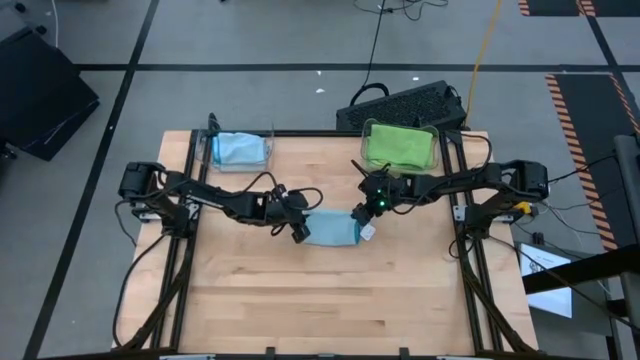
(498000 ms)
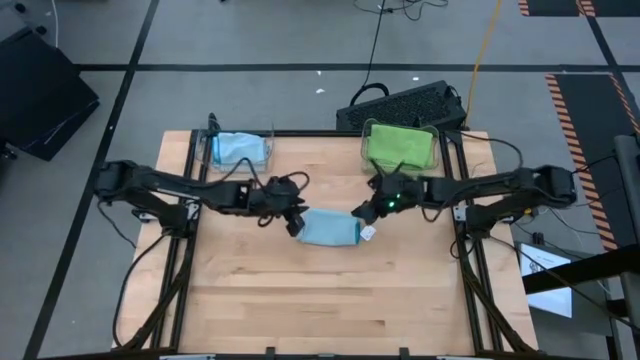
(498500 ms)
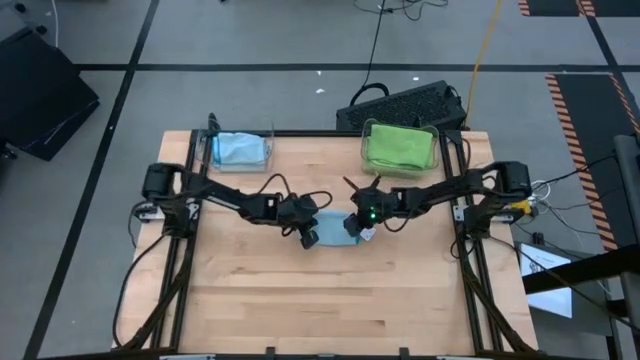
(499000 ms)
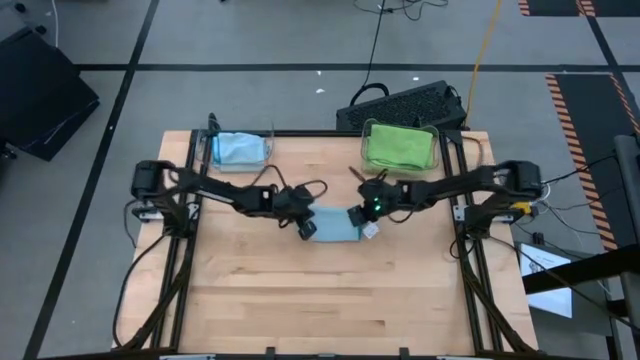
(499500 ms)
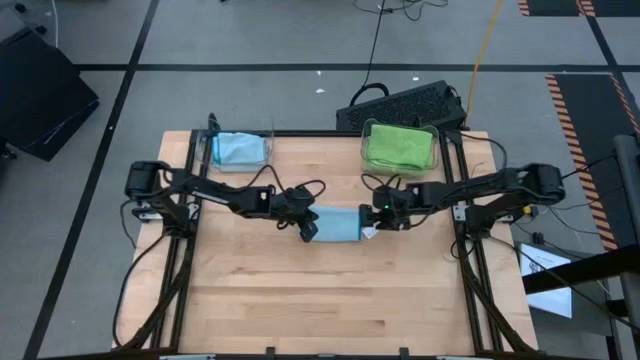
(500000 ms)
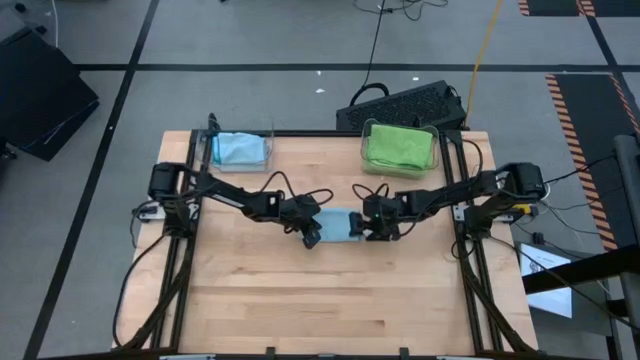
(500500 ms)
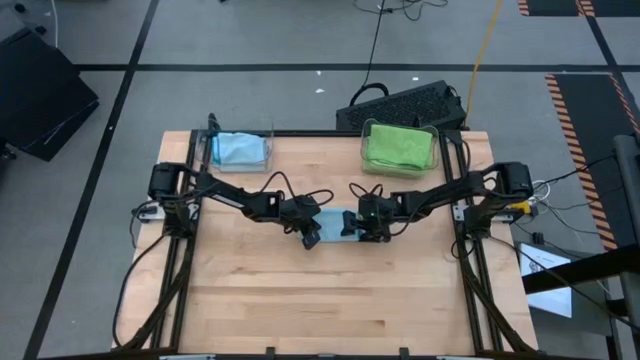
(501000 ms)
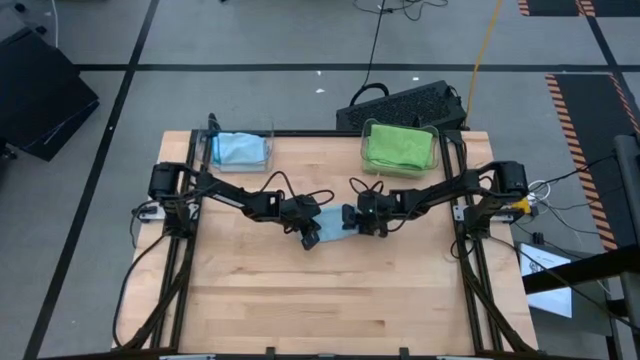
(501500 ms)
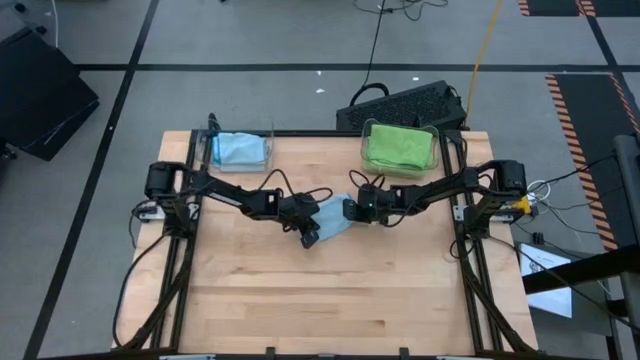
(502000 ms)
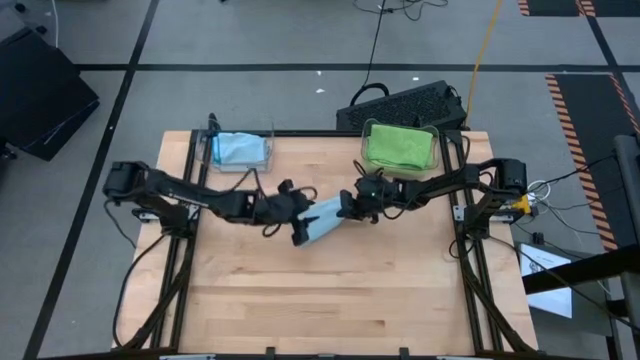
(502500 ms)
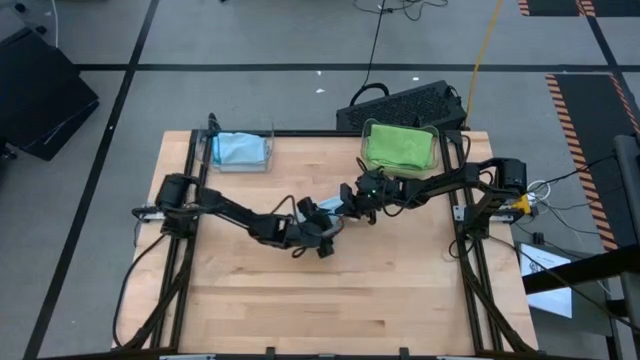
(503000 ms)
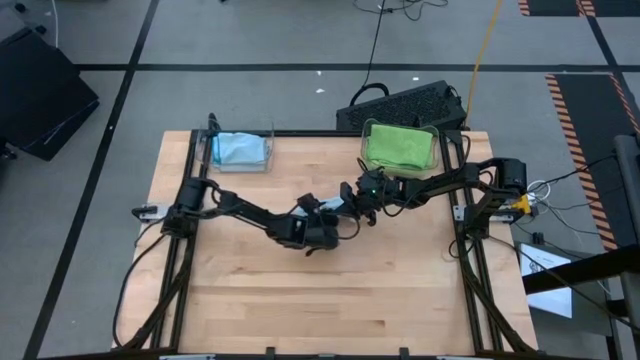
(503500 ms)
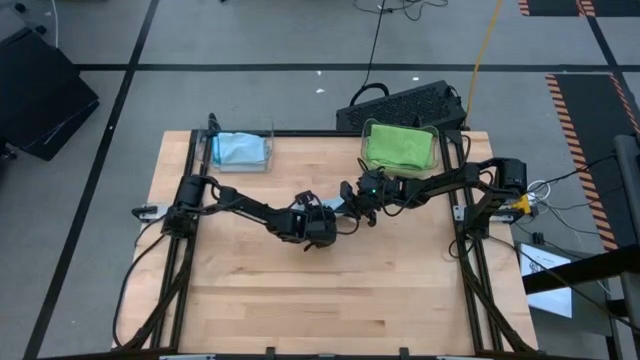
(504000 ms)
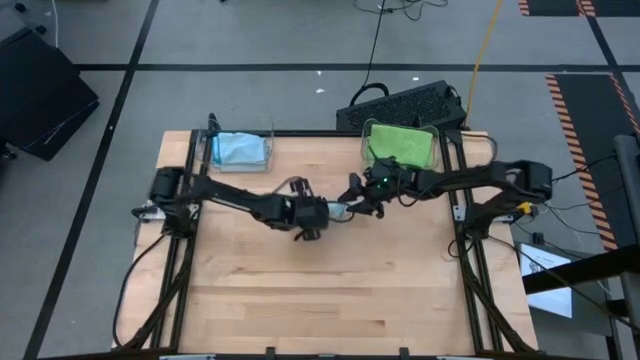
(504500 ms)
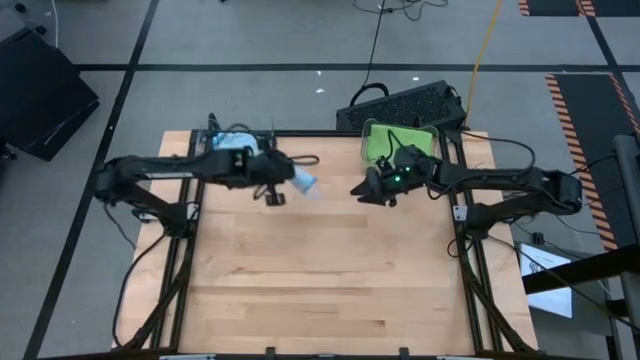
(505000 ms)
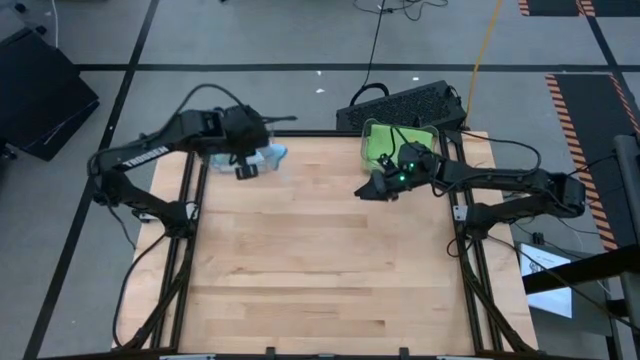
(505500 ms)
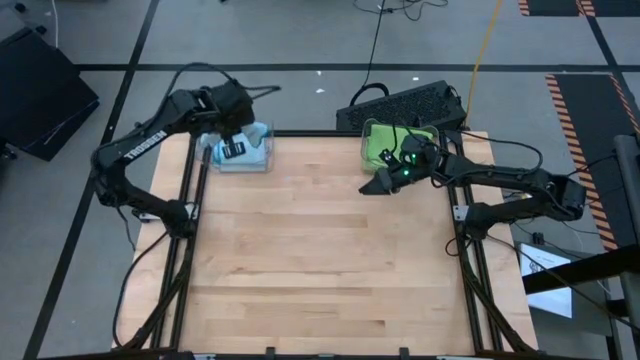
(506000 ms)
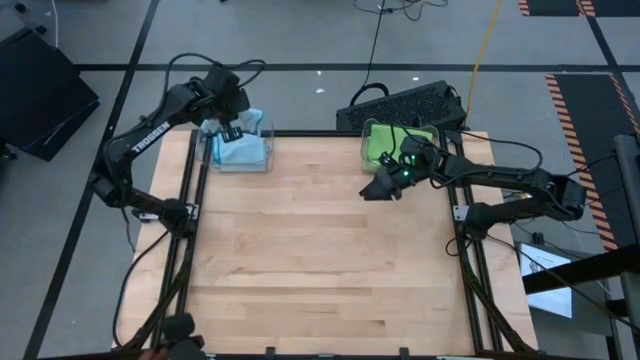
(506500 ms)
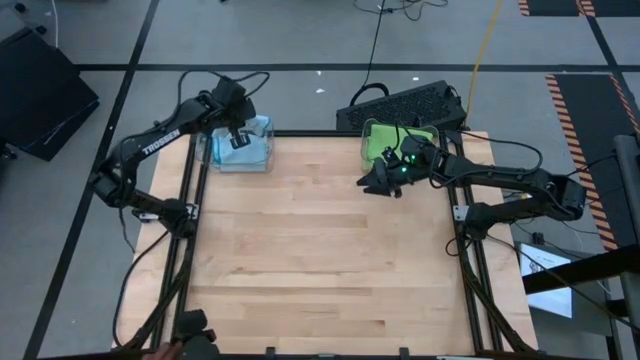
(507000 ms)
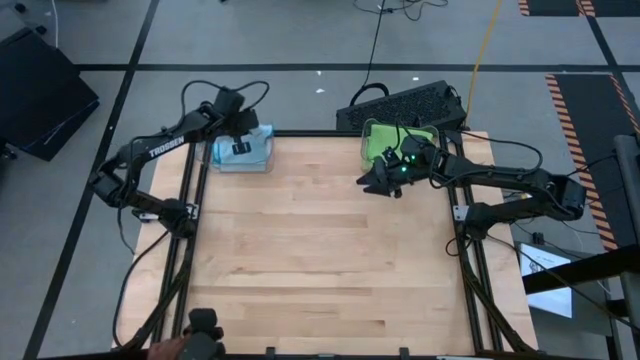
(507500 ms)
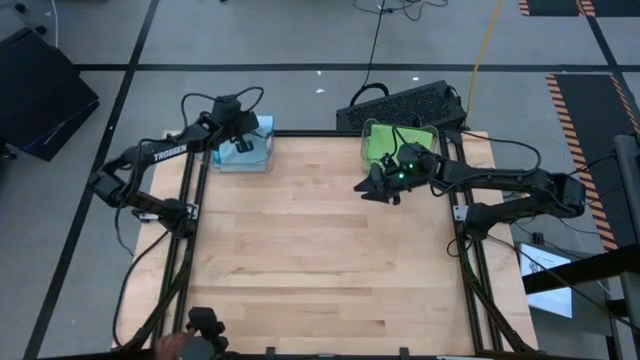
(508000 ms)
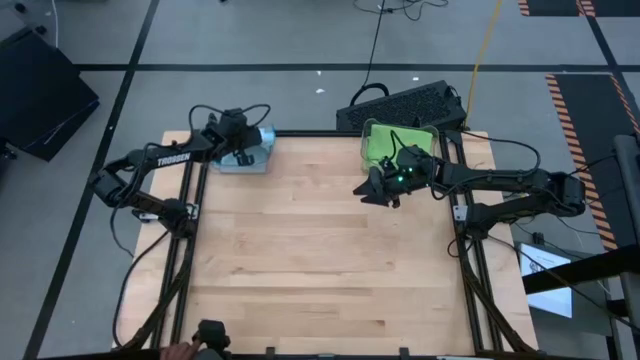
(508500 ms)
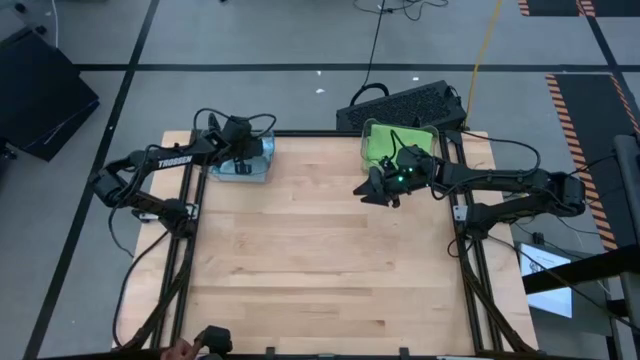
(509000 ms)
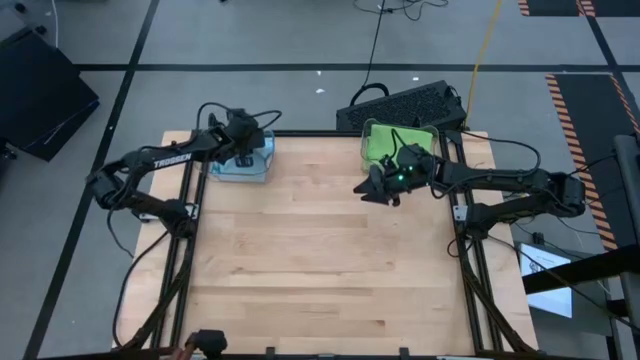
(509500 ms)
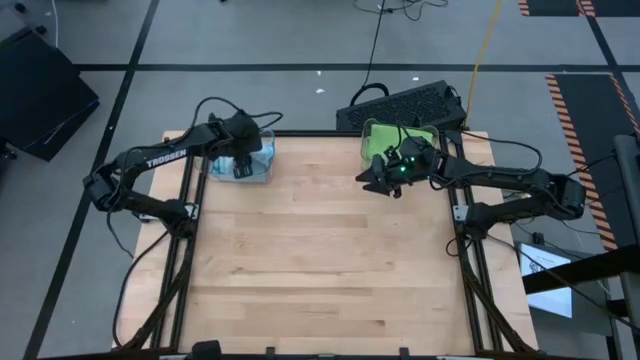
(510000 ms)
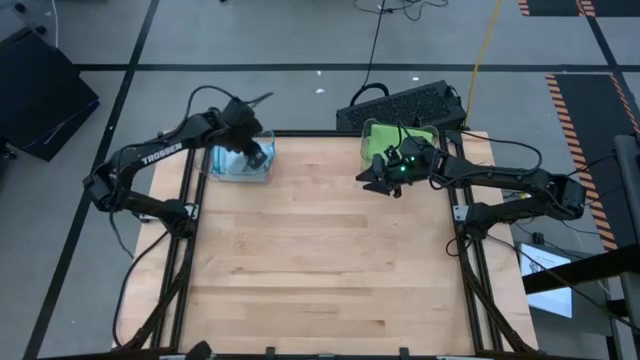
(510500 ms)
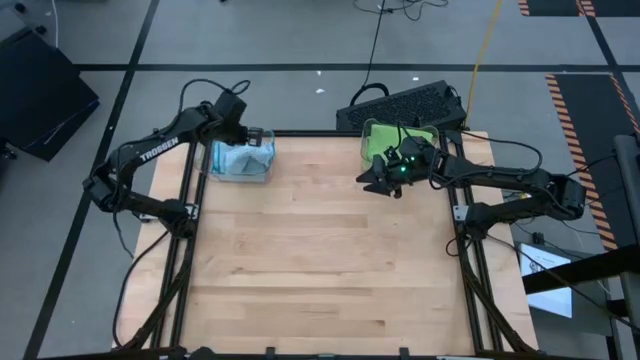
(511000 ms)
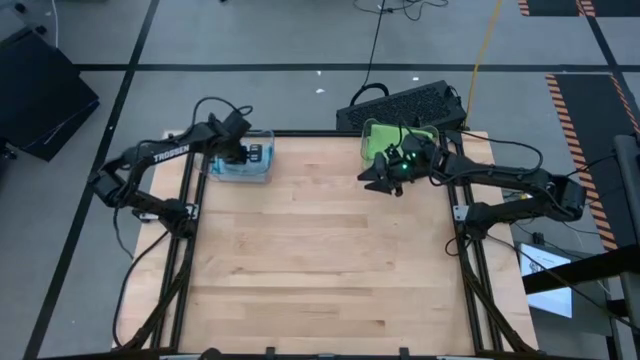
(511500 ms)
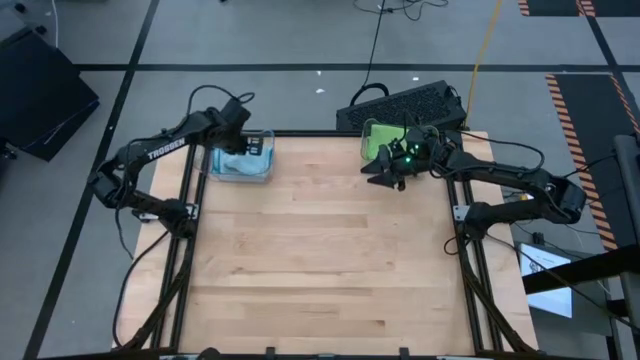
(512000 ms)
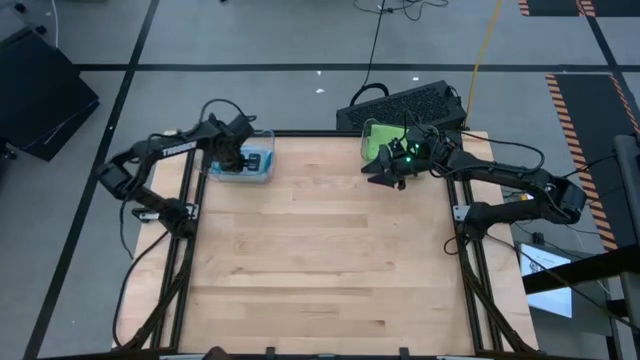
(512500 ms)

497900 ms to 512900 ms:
Task: Sort microfiber towel by color & place in baskets
Stack the blue towel on top of the blue towel in the left transparent bin

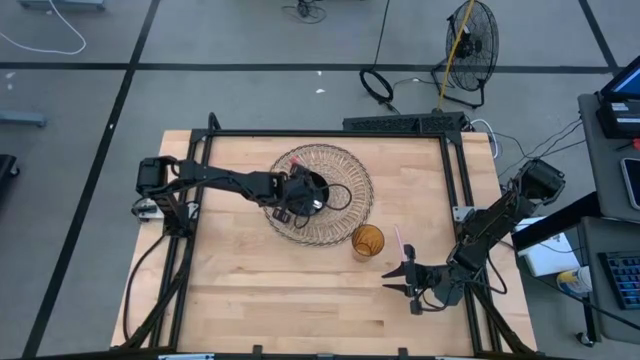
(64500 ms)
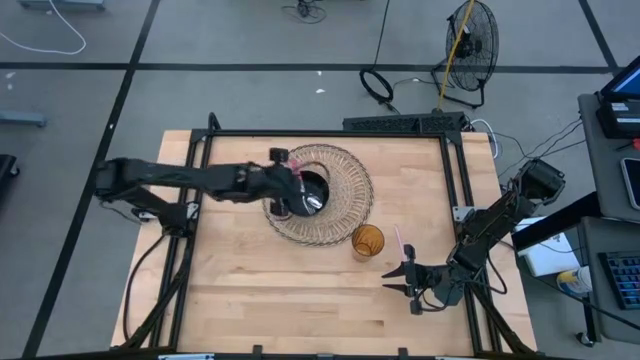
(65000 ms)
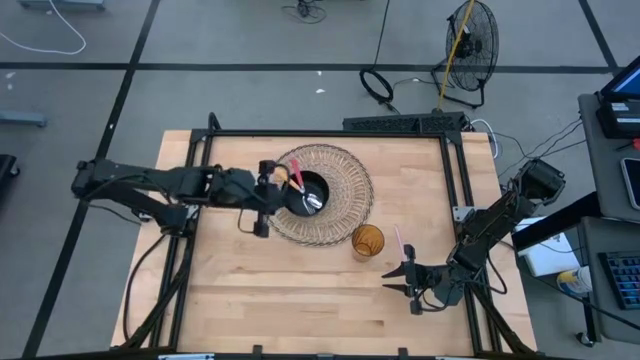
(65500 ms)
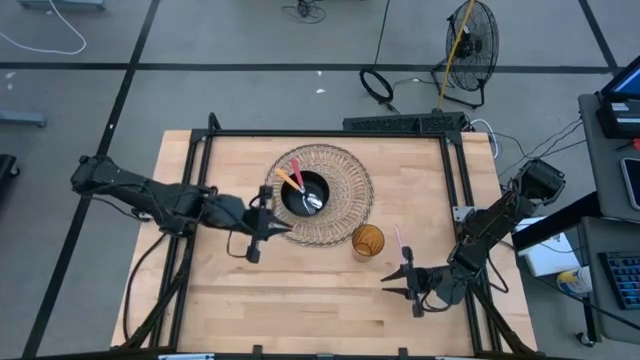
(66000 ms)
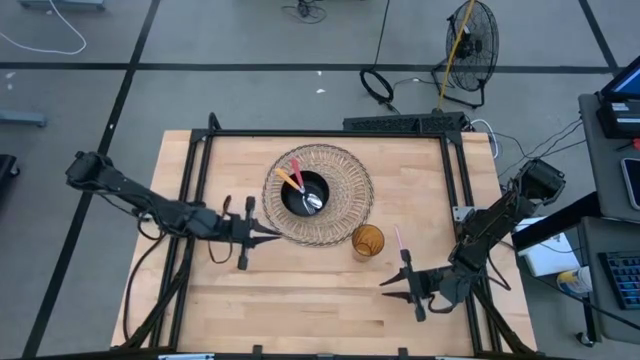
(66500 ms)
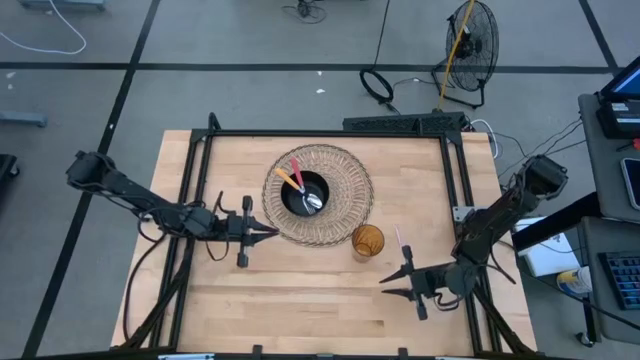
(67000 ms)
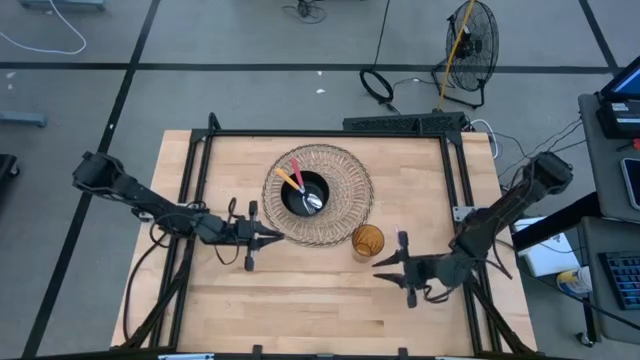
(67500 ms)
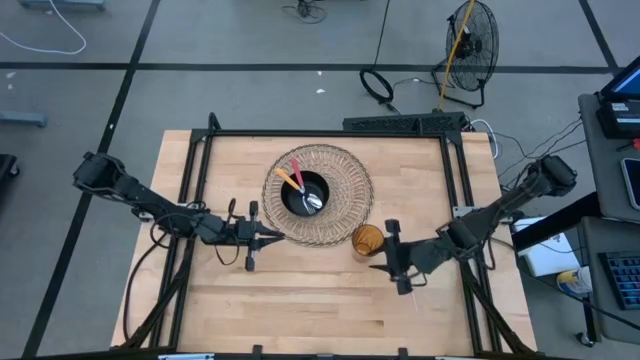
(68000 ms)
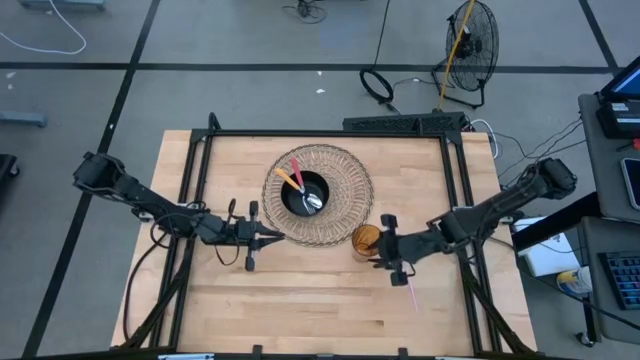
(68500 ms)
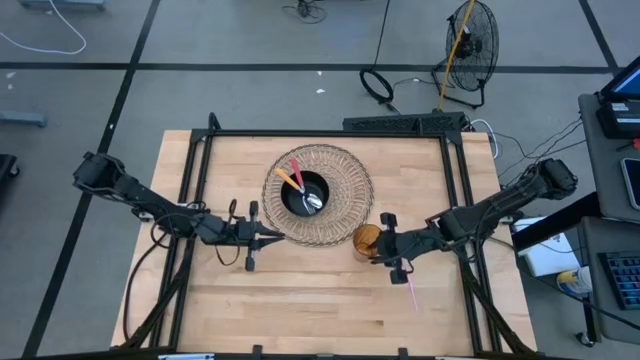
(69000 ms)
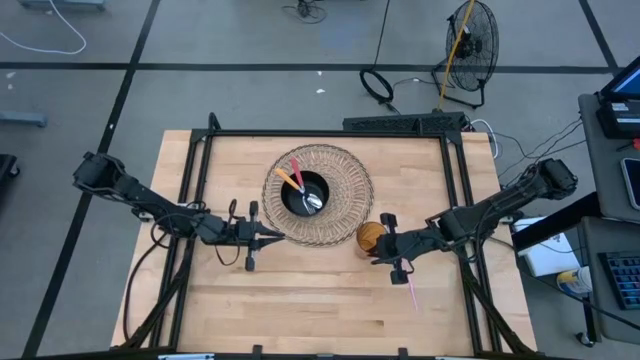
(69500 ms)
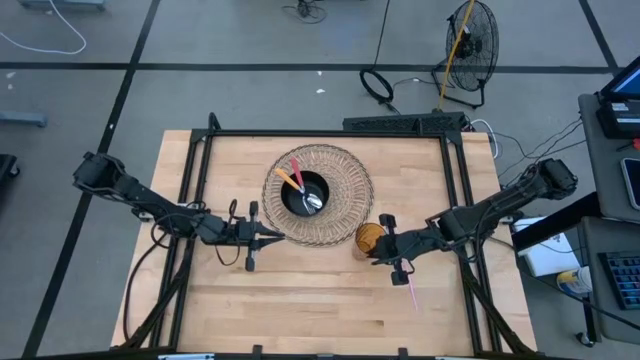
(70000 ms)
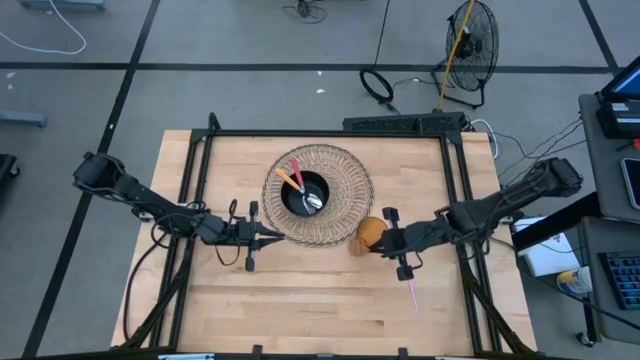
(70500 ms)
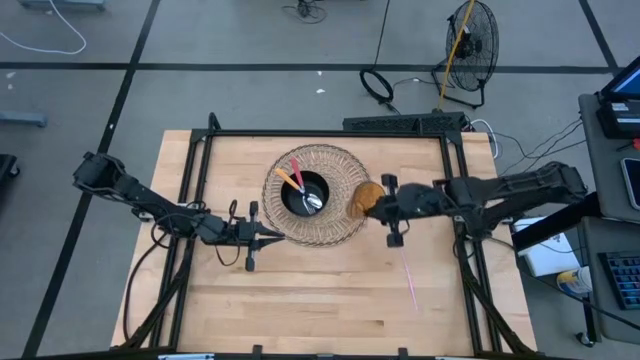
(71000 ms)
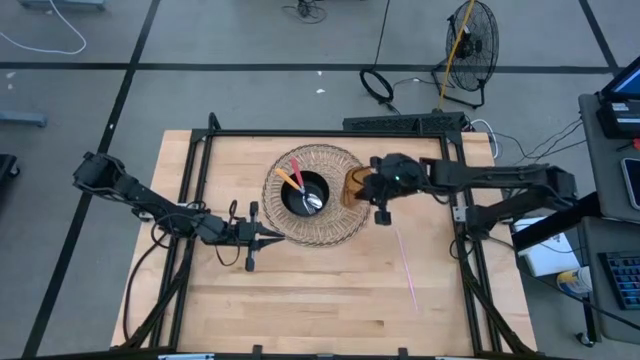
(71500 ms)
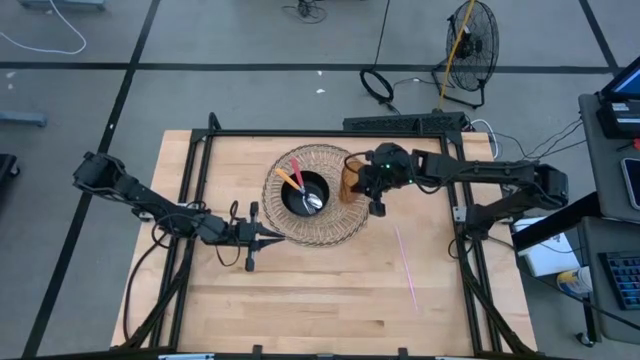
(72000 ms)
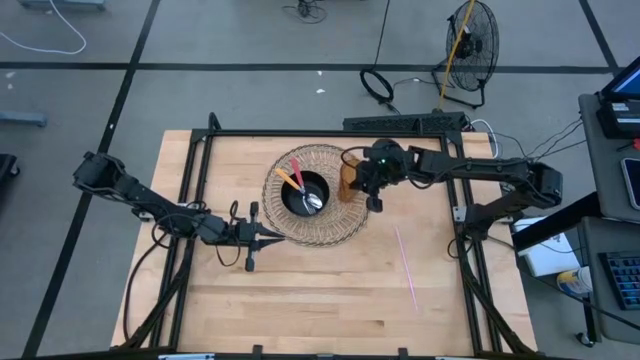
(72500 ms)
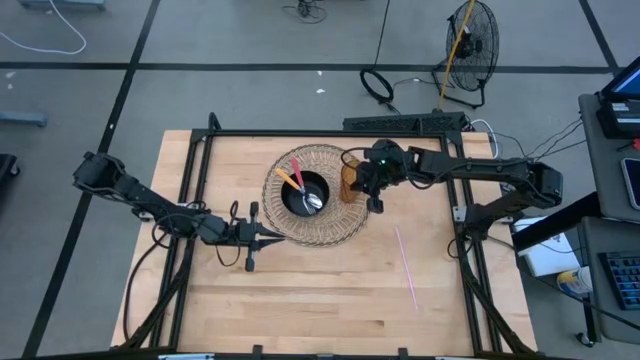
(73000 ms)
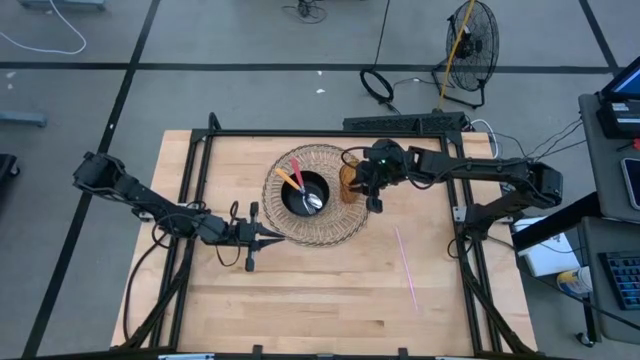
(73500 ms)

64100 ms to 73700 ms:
Task: Pick & Place Utensil
Put the orange cup on the woven mat to the right of the black bowl
